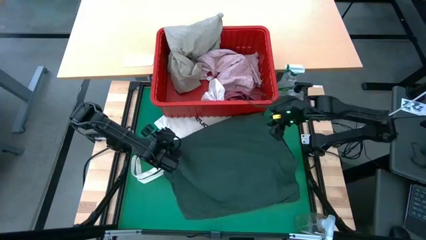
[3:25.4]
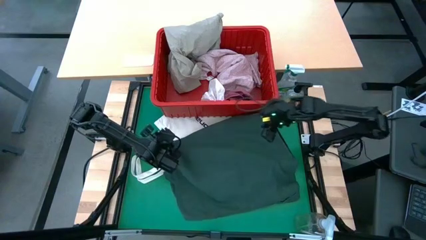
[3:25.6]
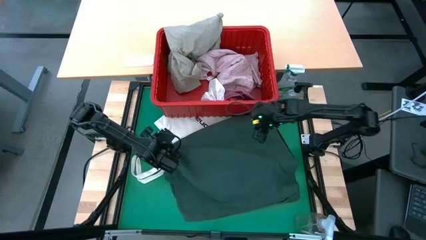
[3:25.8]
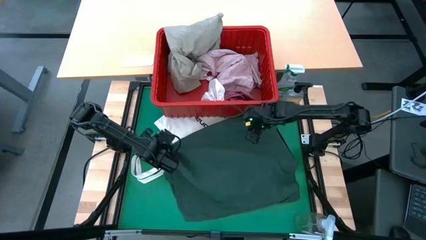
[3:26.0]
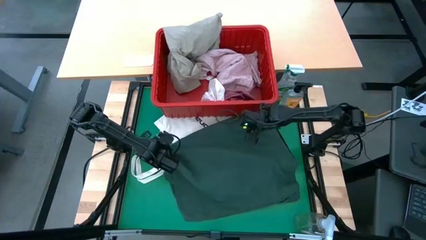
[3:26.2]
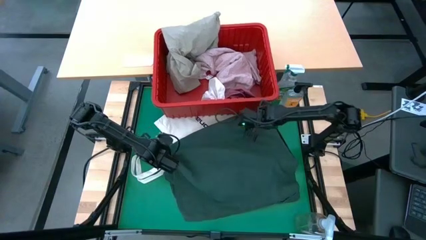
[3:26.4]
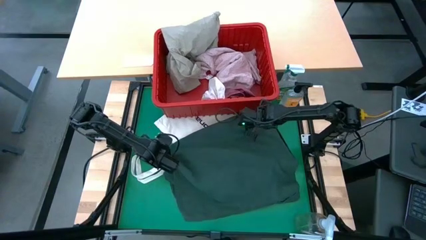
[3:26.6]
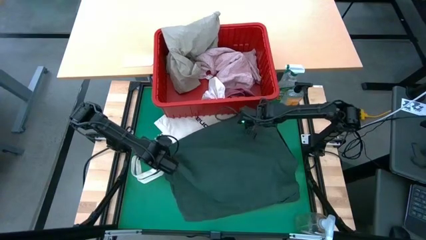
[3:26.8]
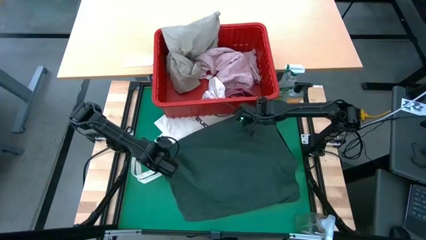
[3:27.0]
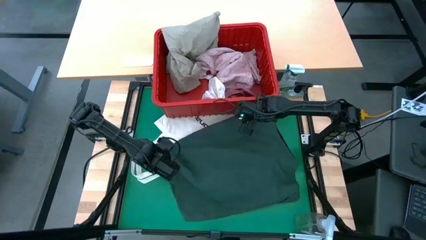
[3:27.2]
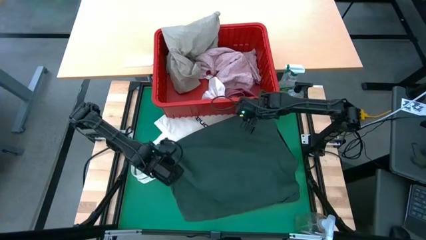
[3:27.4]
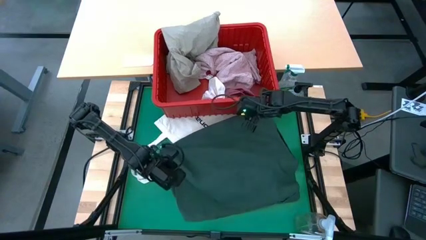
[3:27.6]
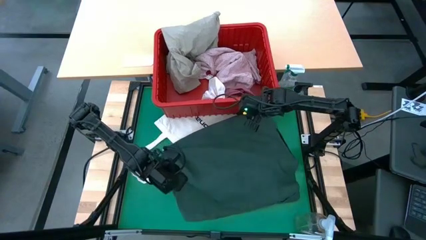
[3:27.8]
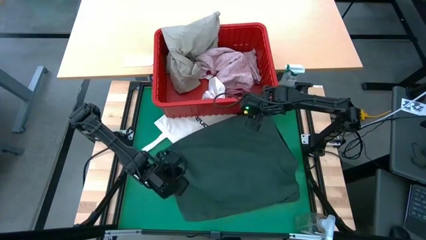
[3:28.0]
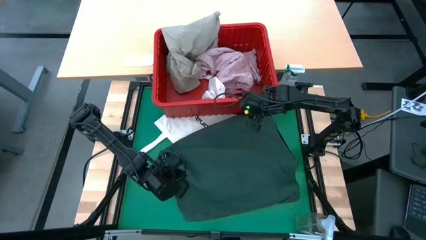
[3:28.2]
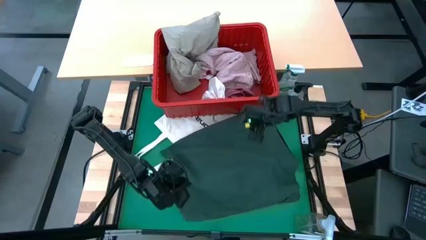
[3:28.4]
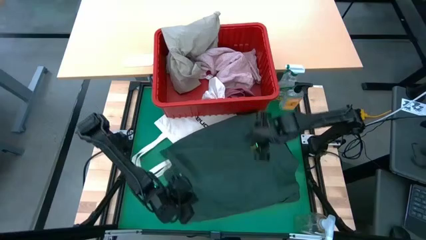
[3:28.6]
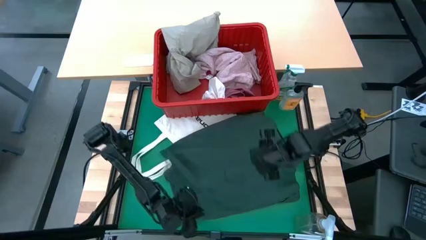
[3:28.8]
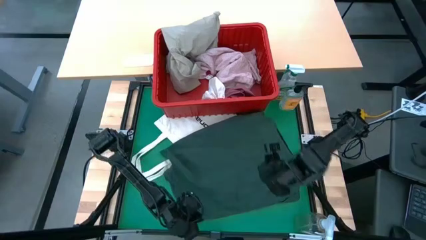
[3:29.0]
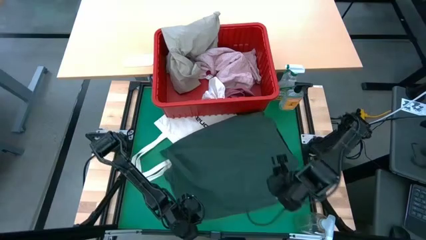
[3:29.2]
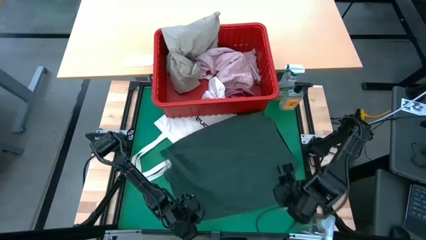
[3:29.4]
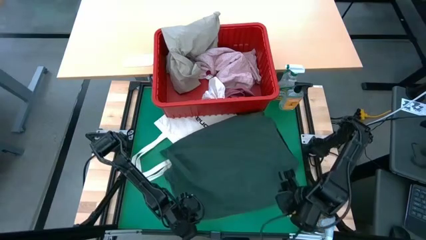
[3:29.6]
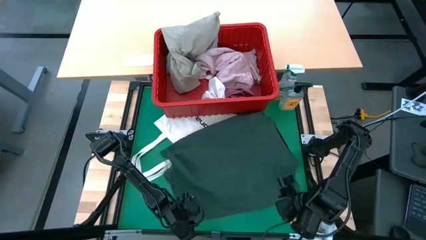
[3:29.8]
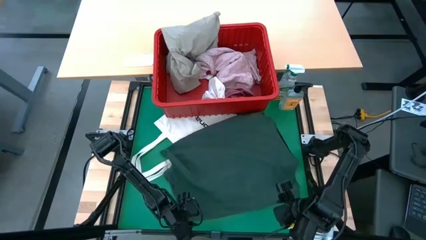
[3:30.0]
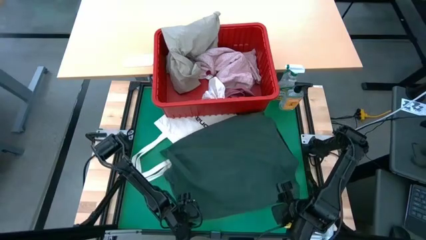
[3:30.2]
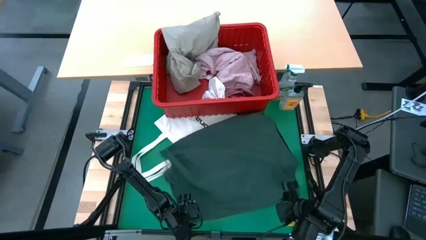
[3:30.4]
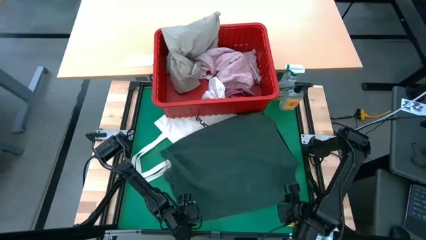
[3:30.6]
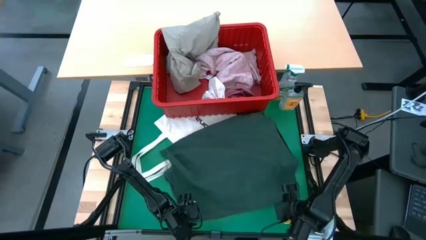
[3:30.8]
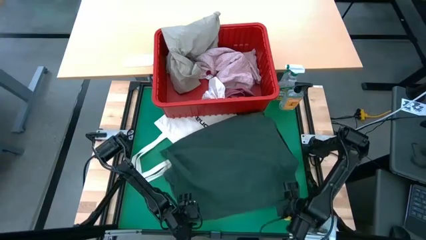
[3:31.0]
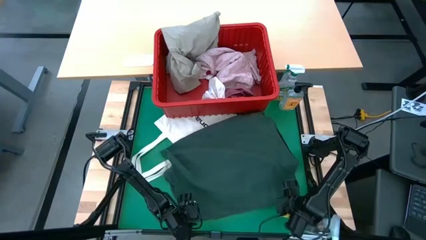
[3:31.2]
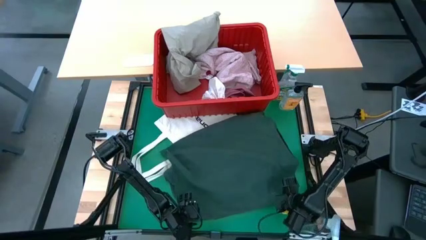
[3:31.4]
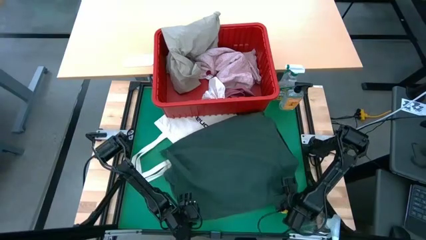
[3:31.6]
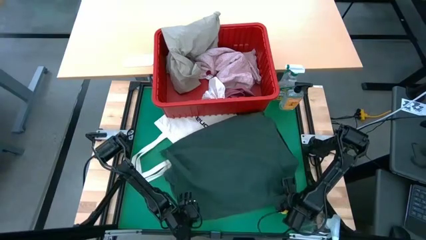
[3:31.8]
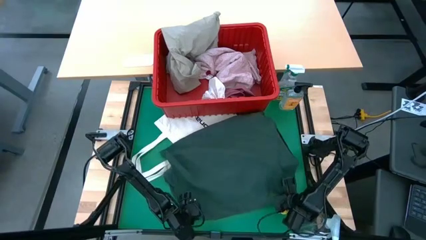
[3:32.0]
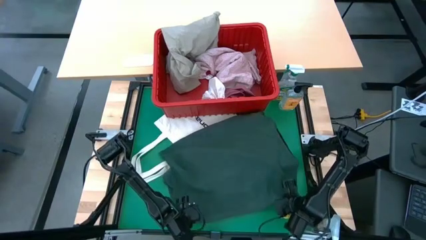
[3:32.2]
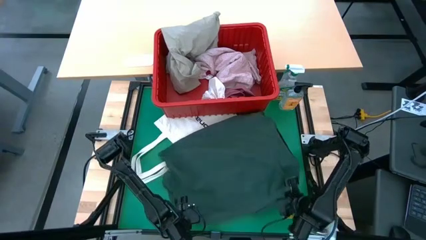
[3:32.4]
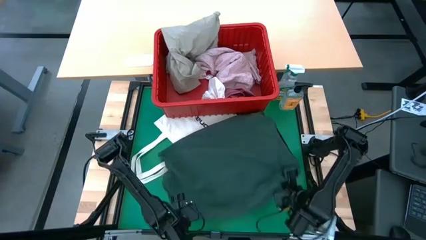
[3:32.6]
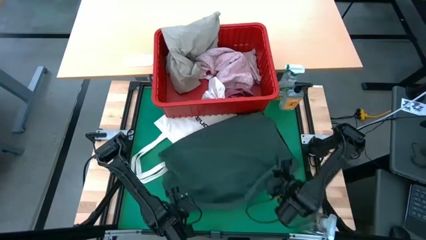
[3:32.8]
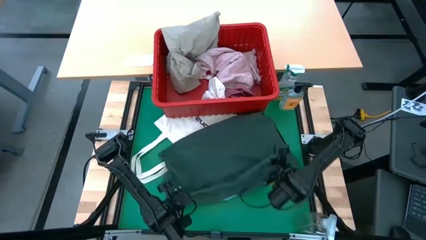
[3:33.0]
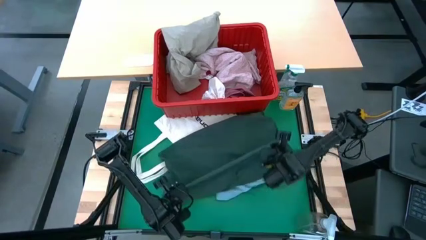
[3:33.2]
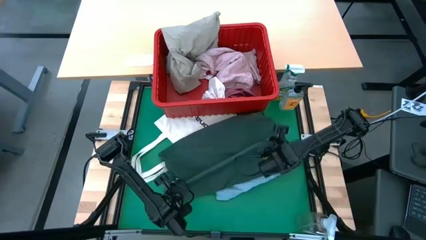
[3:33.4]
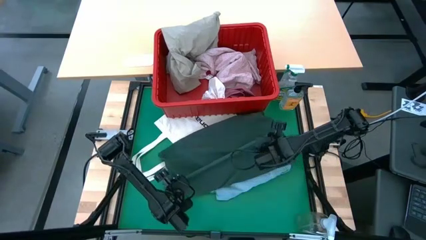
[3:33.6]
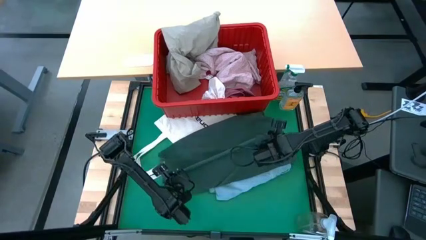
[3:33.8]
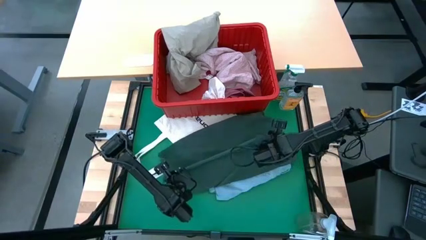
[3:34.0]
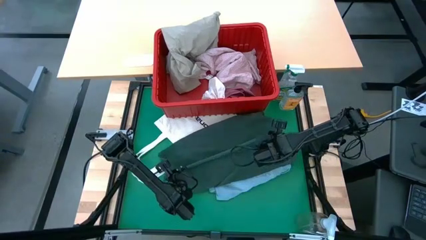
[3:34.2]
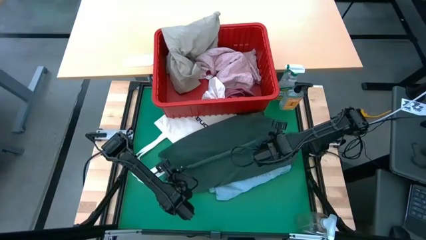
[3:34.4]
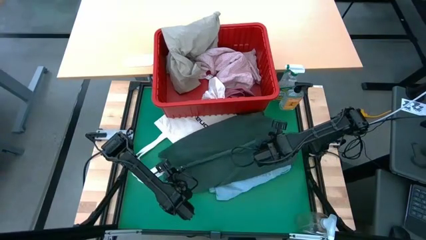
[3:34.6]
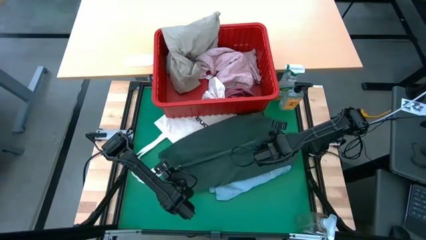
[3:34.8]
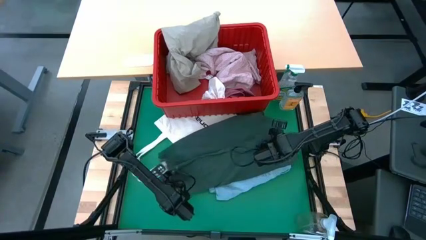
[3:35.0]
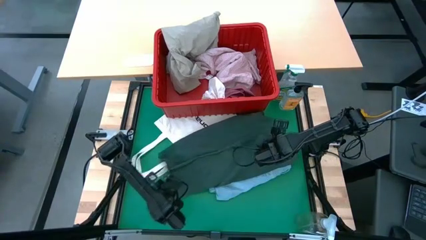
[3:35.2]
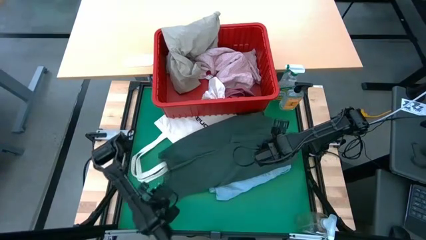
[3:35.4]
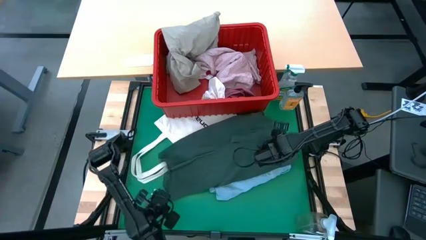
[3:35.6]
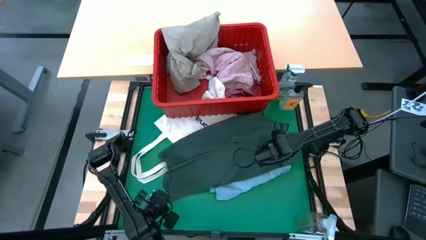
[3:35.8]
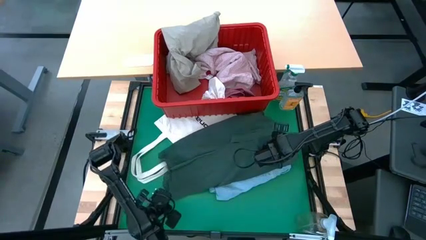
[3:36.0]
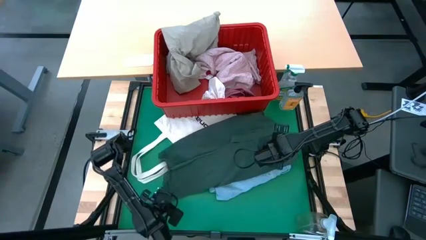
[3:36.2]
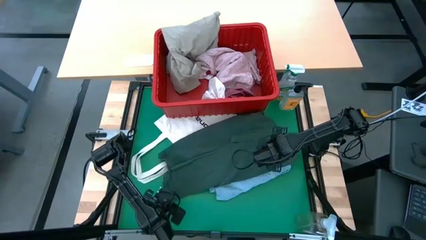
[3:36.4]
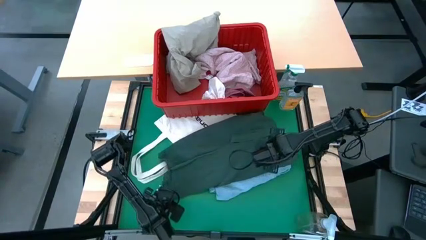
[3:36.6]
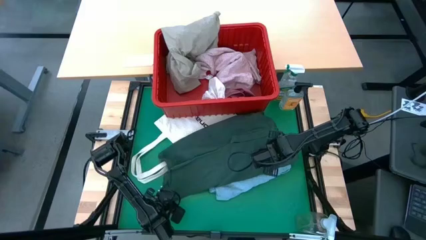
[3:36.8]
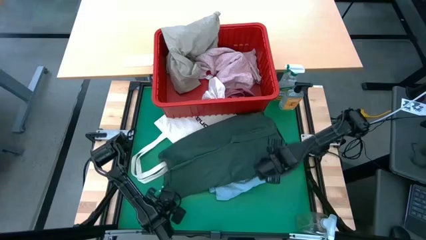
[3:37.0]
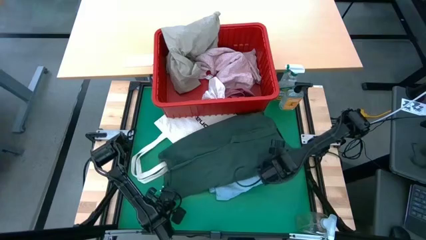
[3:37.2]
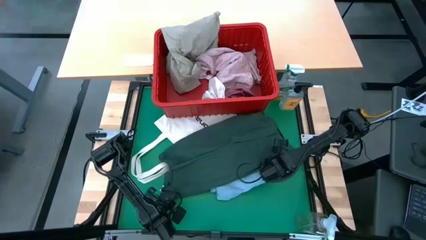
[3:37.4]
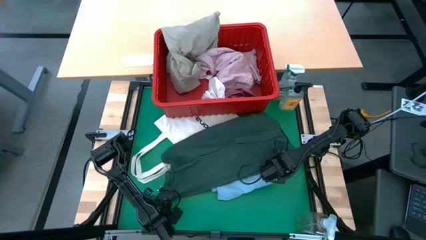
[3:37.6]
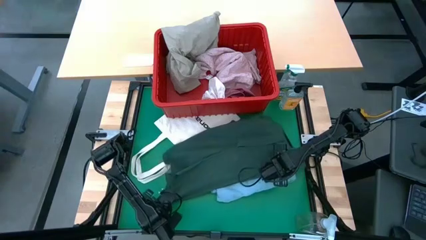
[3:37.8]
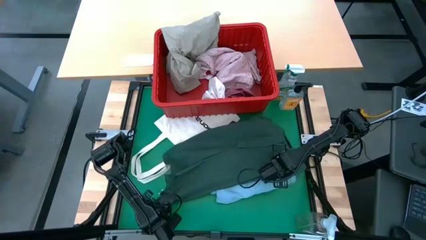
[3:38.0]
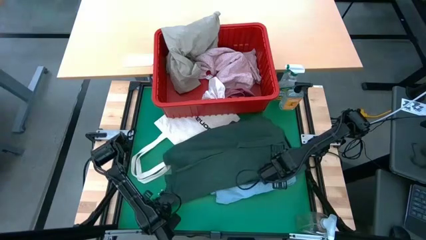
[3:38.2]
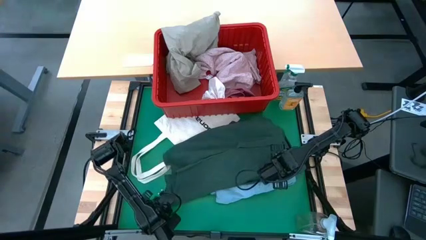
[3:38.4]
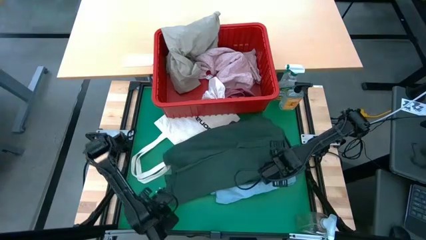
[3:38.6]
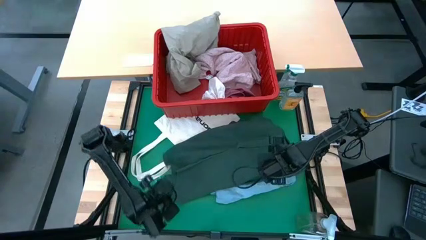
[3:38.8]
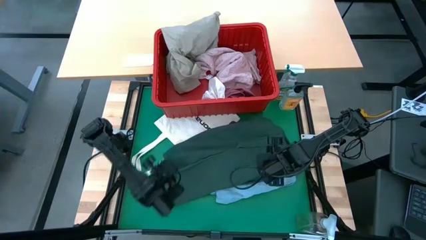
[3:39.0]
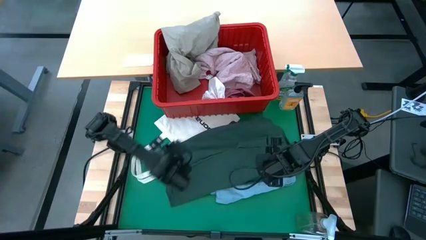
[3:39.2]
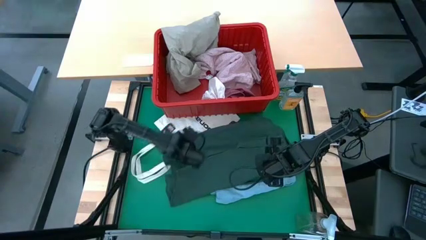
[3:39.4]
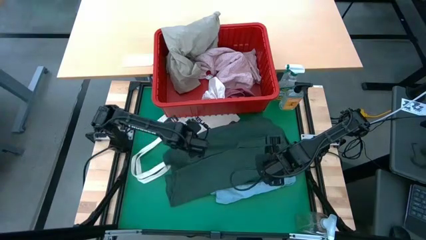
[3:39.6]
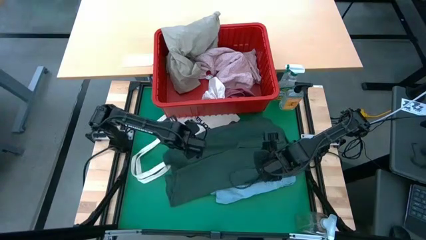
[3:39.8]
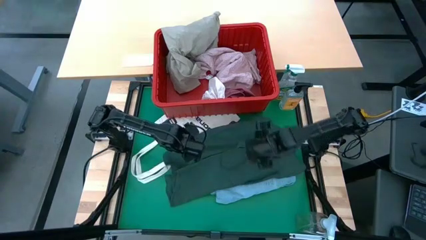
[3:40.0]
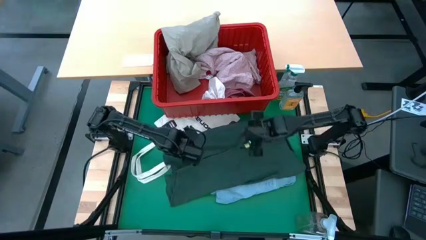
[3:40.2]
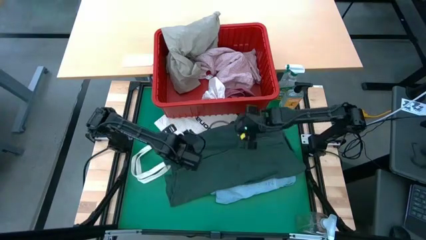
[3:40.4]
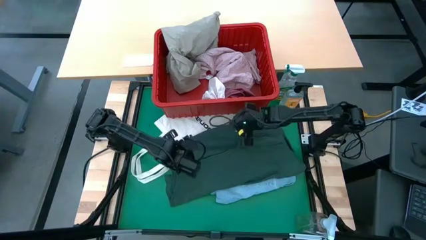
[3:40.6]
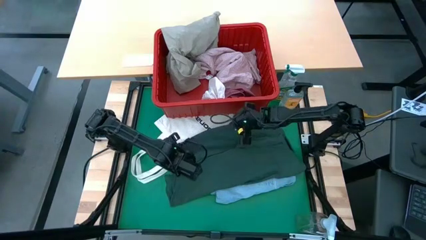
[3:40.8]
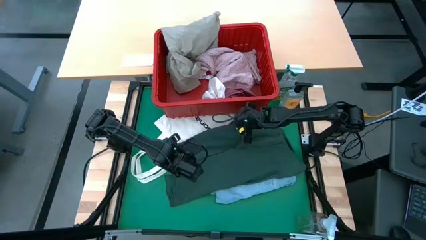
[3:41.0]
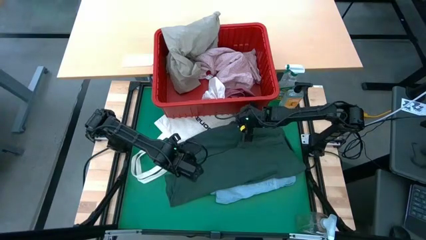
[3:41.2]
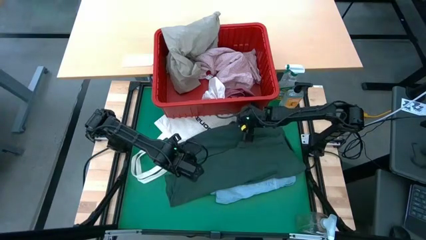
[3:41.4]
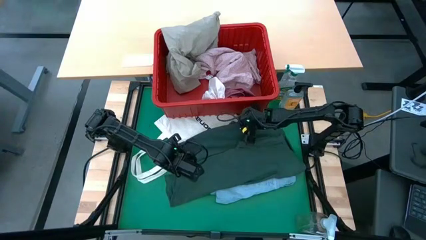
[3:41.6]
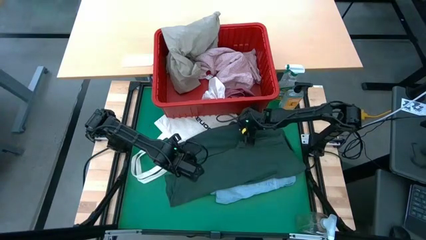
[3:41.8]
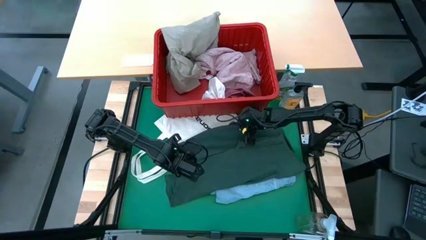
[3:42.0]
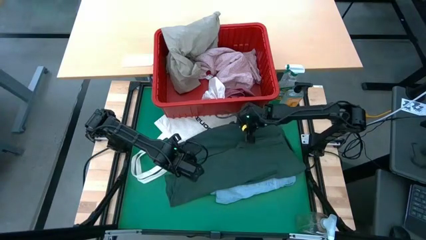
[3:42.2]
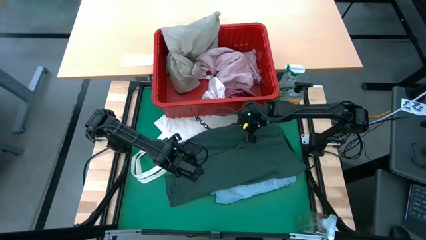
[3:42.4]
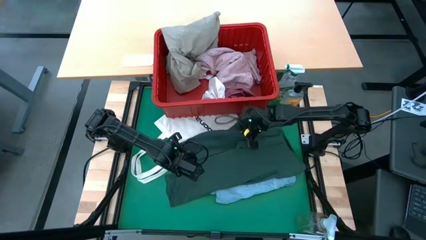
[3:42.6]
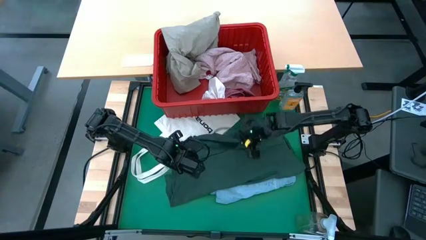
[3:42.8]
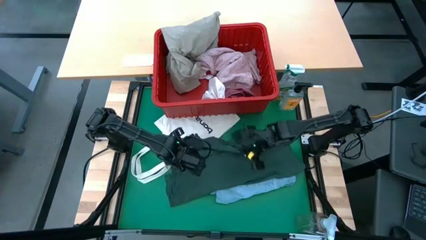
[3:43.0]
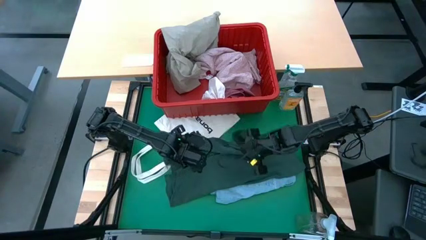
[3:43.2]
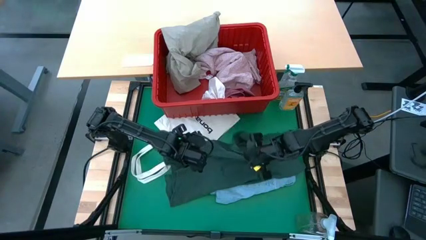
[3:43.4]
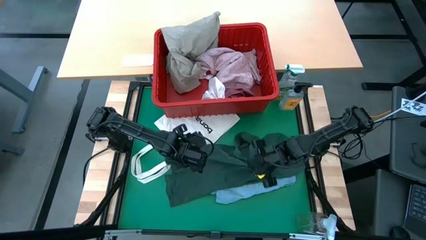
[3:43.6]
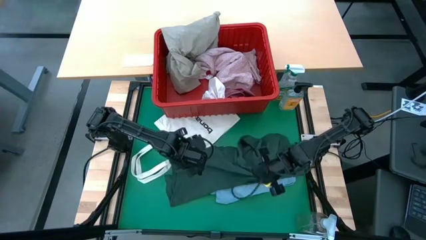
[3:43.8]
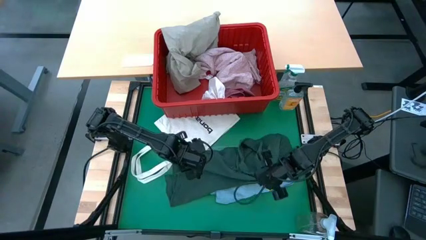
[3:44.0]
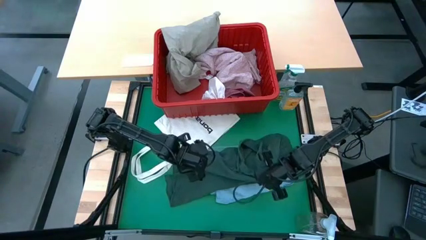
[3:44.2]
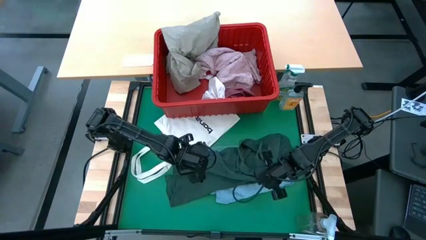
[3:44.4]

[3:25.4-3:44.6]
Task: Fold laundry
Fold the green shirt
